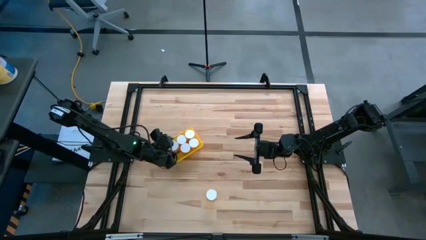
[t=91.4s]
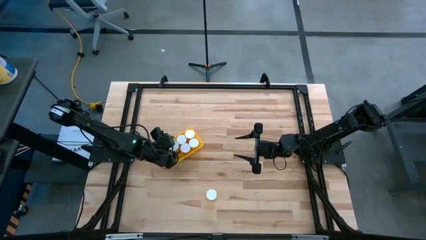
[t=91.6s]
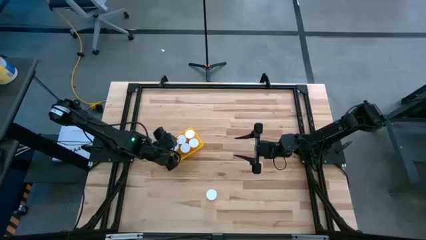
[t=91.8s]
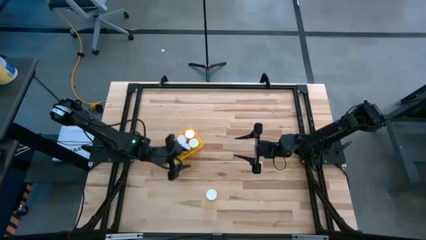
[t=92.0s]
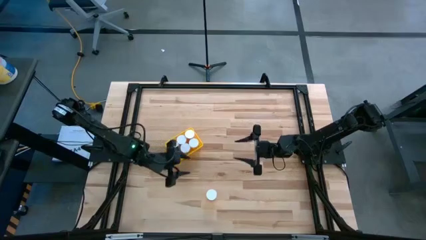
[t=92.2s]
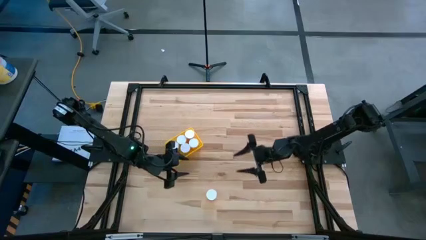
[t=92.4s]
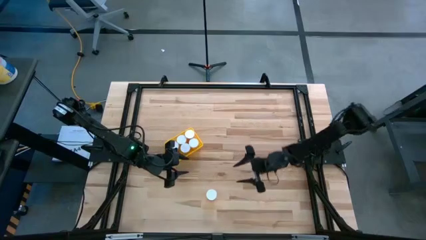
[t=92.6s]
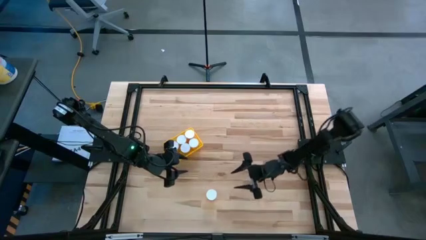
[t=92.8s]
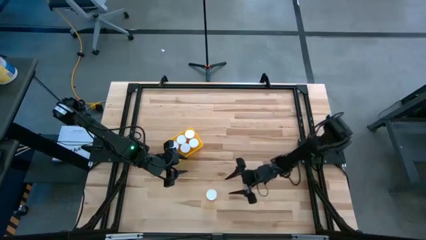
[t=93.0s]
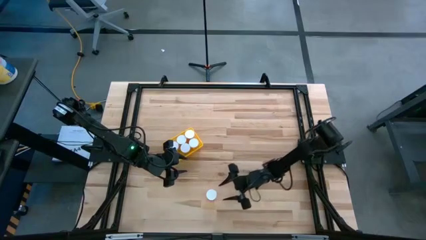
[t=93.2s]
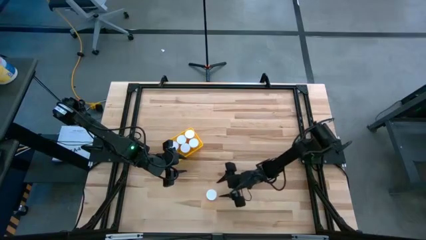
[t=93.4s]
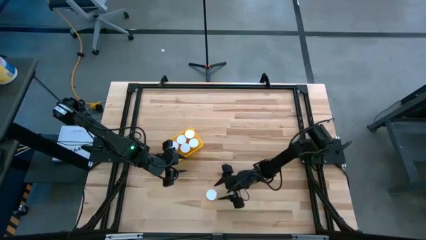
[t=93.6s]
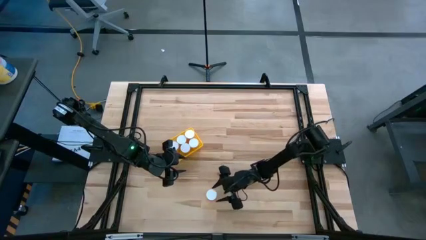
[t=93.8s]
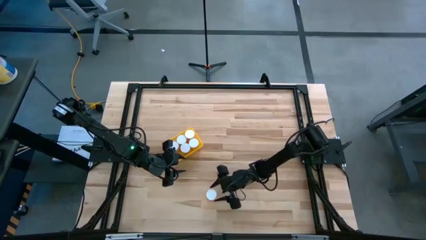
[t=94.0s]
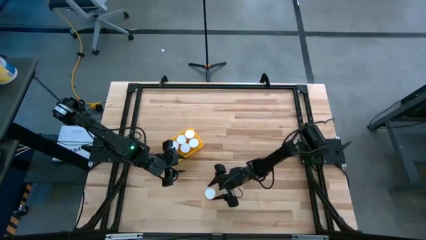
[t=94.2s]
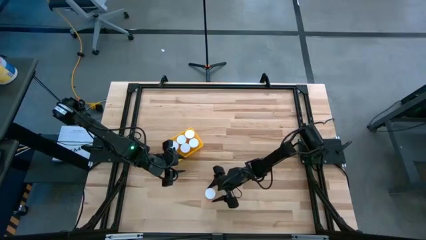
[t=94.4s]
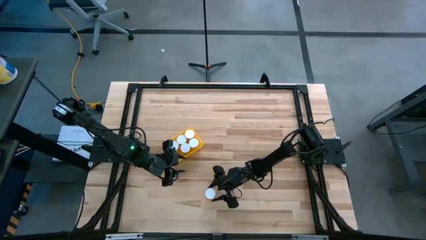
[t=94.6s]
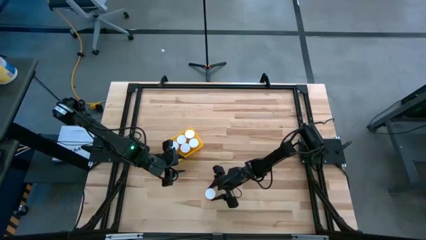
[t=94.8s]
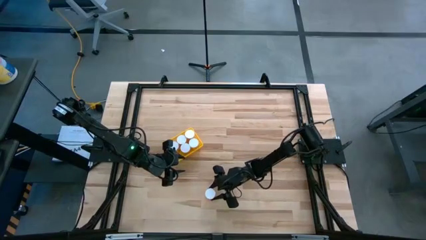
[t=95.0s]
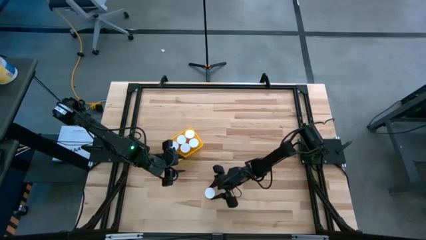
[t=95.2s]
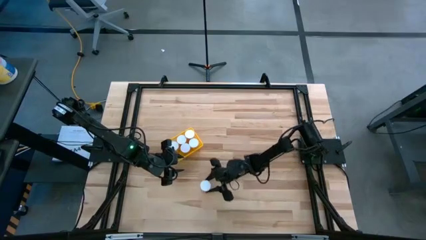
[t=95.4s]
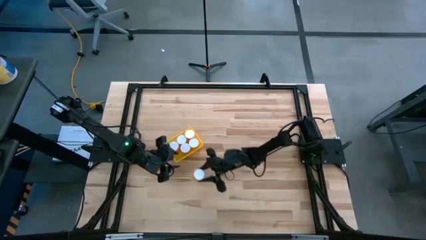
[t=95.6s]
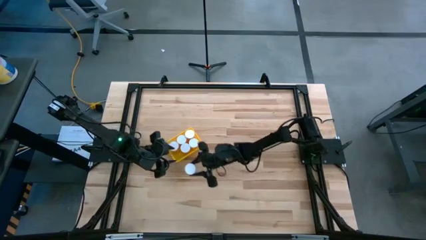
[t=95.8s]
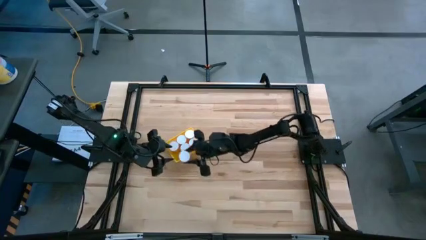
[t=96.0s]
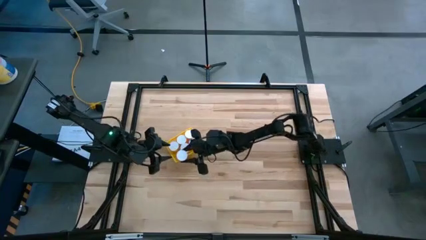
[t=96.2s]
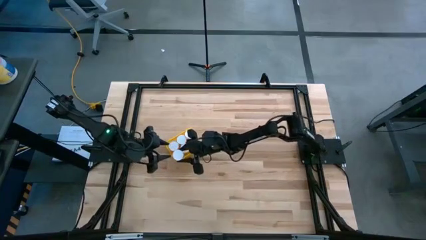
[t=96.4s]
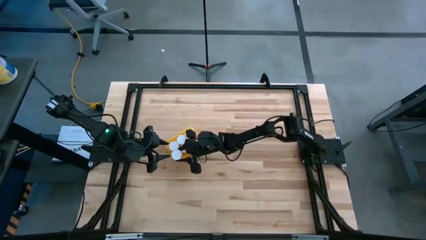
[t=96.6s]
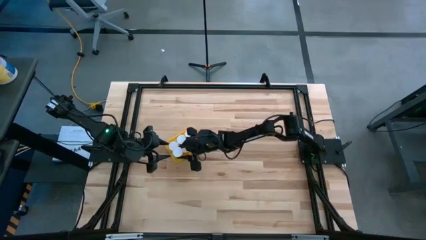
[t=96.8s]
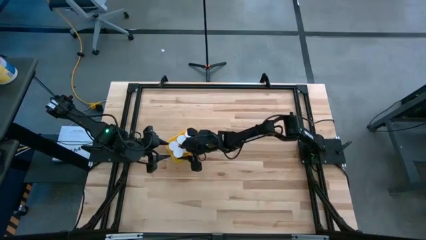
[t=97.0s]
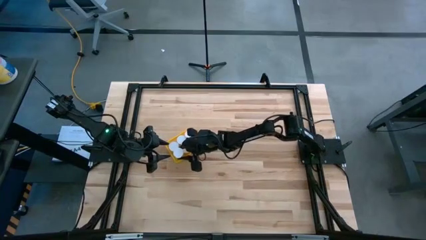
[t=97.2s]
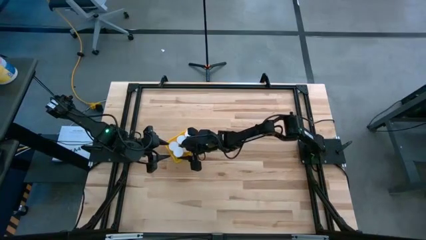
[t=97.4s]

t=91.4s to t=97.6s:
Task: Pick and place pill bottles into a basket
Put the orange pill bottle into the yellow basket

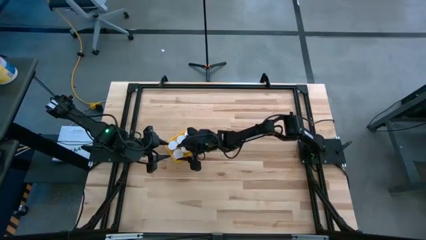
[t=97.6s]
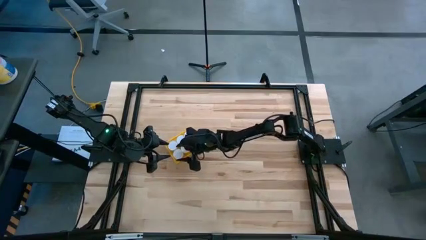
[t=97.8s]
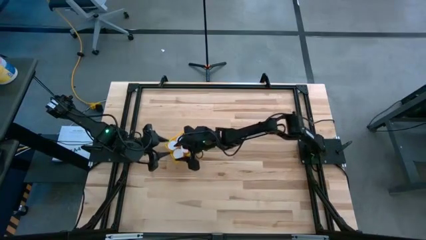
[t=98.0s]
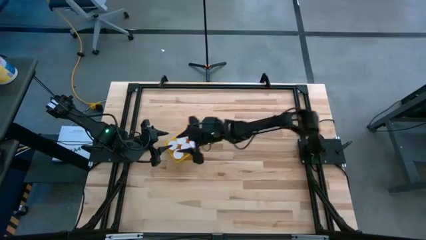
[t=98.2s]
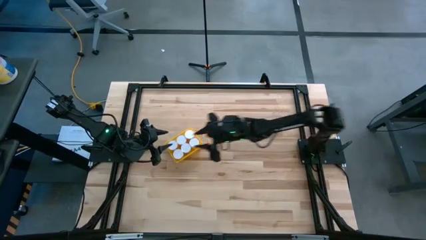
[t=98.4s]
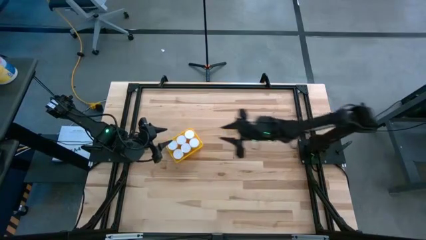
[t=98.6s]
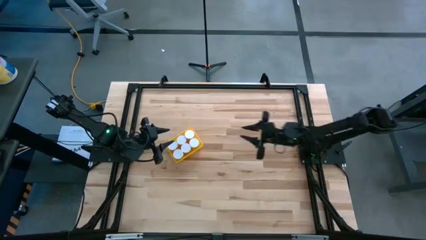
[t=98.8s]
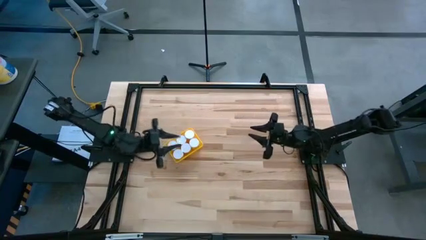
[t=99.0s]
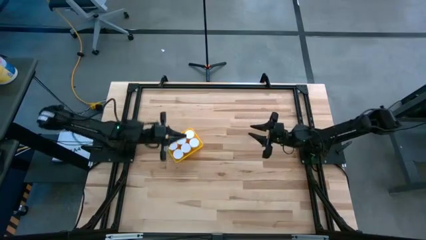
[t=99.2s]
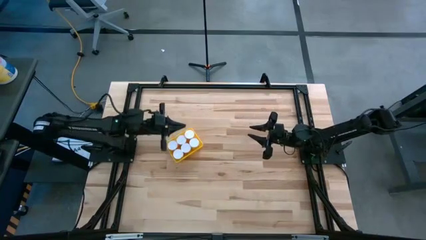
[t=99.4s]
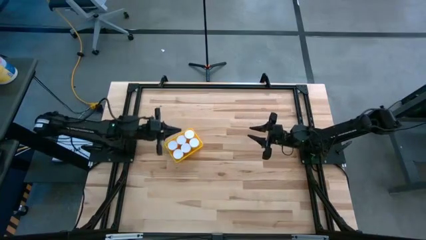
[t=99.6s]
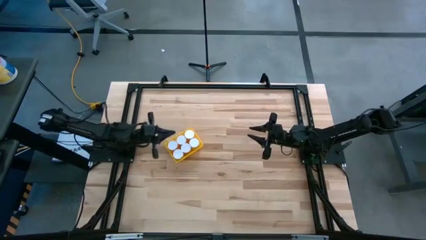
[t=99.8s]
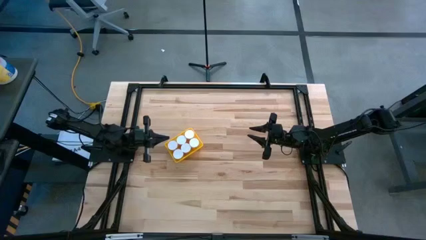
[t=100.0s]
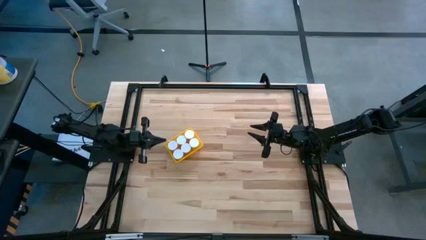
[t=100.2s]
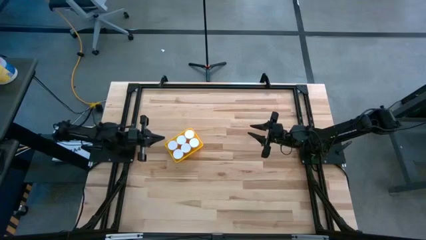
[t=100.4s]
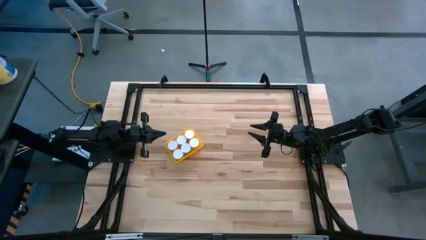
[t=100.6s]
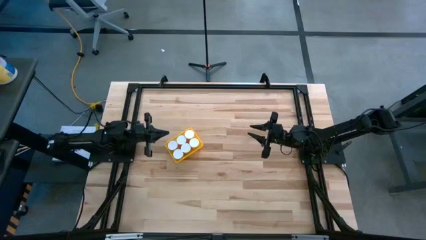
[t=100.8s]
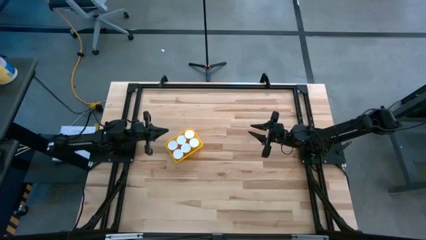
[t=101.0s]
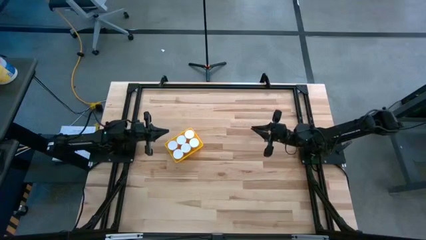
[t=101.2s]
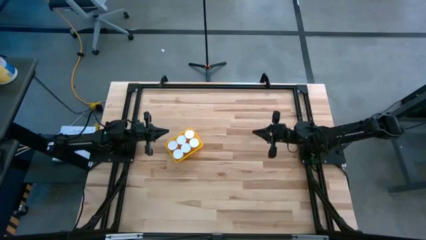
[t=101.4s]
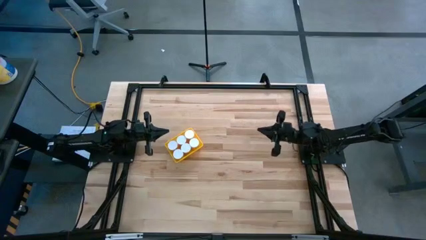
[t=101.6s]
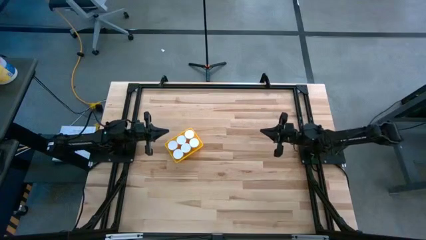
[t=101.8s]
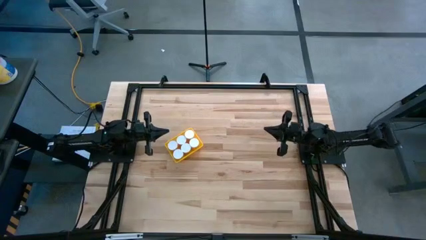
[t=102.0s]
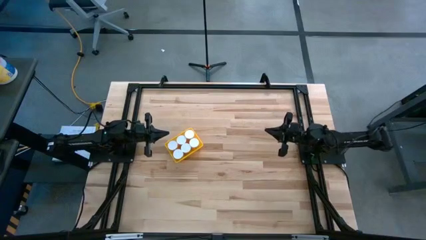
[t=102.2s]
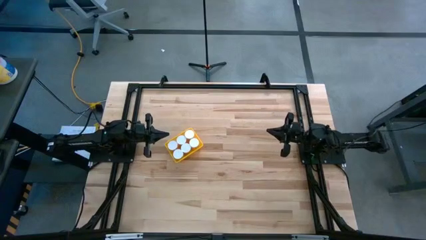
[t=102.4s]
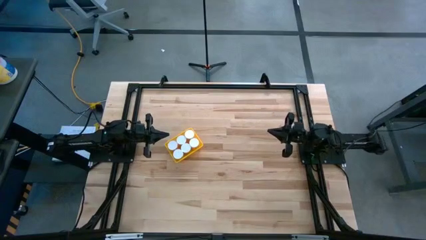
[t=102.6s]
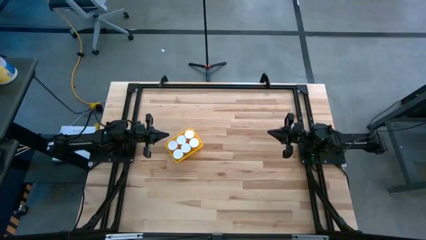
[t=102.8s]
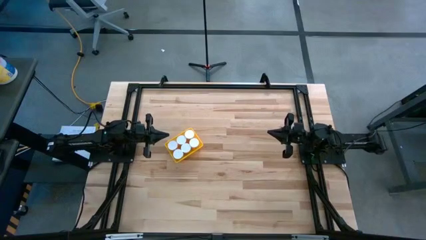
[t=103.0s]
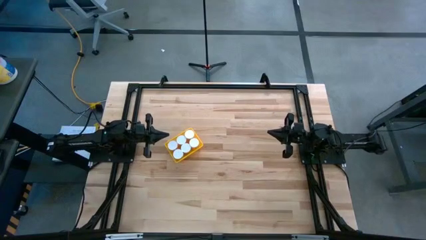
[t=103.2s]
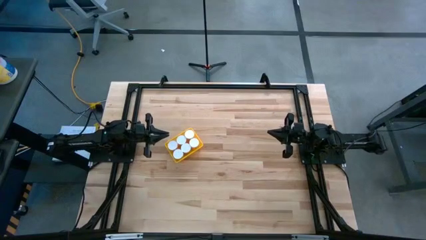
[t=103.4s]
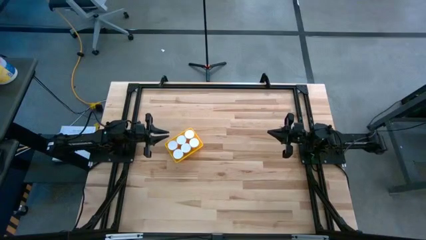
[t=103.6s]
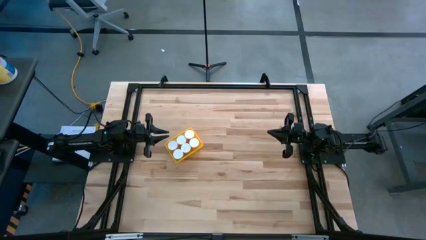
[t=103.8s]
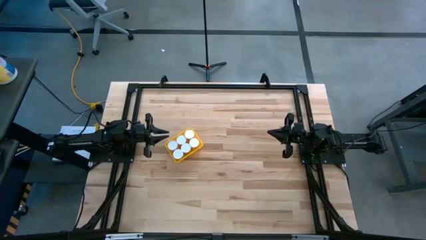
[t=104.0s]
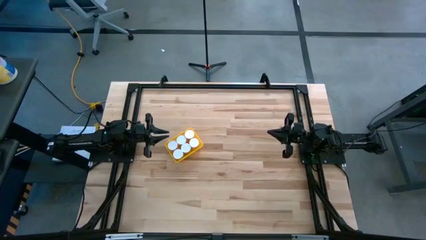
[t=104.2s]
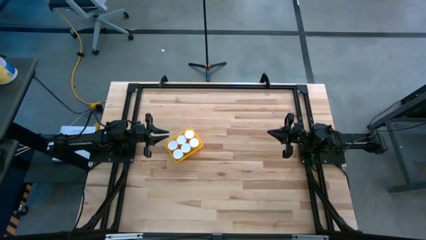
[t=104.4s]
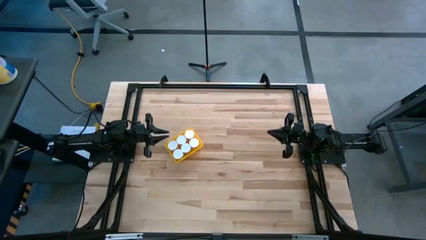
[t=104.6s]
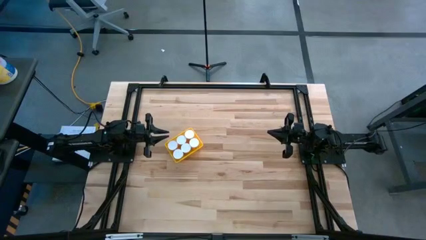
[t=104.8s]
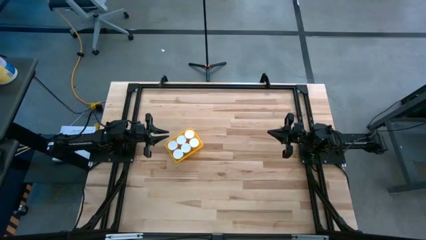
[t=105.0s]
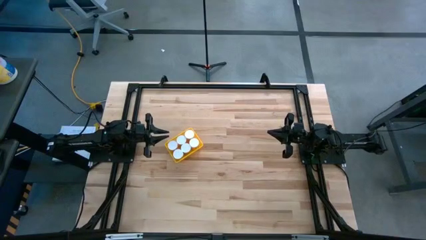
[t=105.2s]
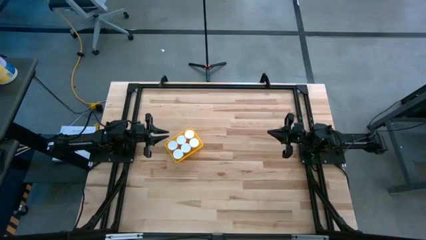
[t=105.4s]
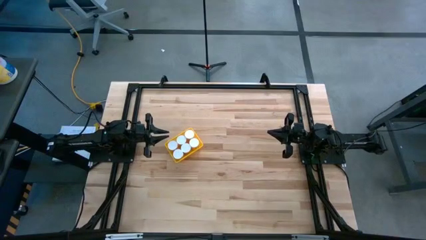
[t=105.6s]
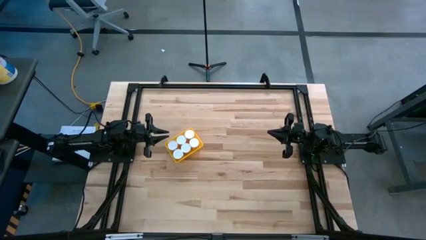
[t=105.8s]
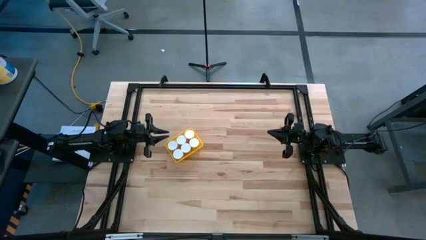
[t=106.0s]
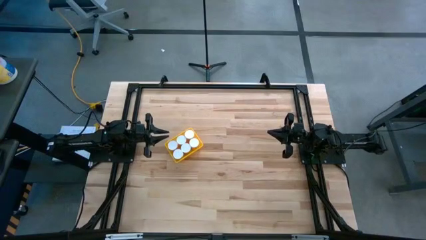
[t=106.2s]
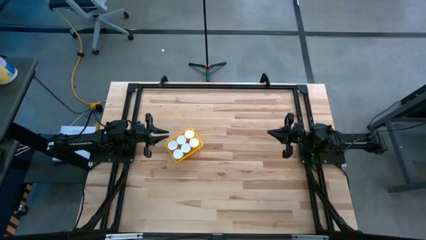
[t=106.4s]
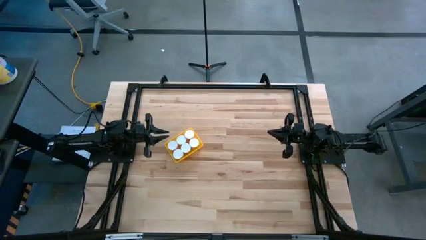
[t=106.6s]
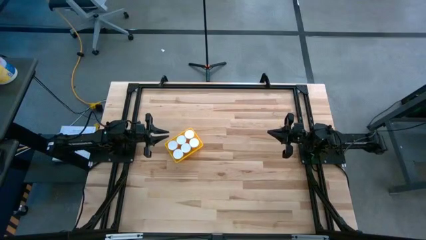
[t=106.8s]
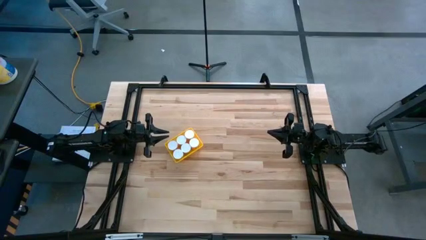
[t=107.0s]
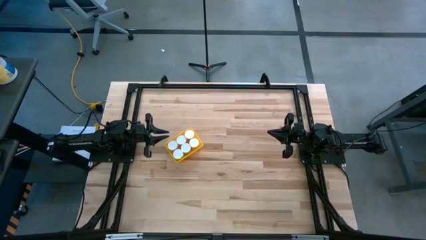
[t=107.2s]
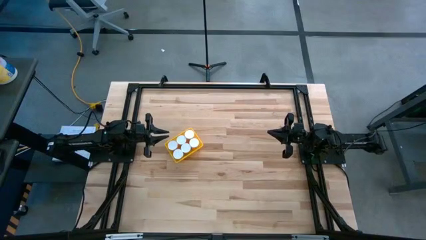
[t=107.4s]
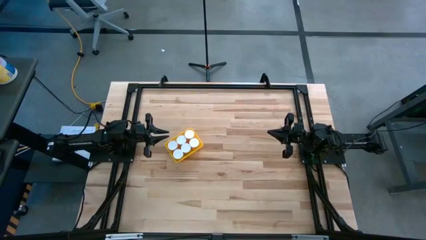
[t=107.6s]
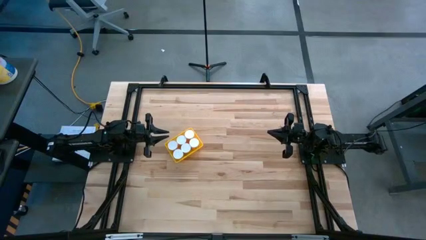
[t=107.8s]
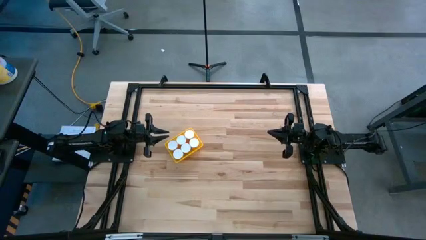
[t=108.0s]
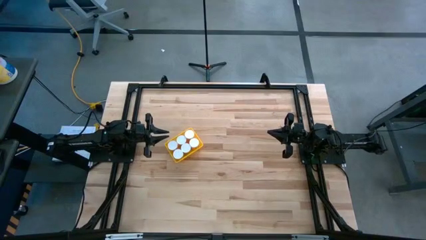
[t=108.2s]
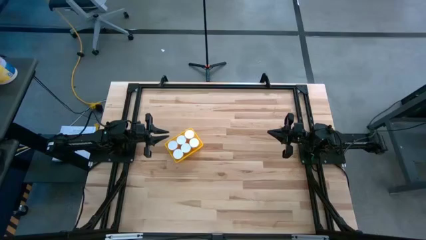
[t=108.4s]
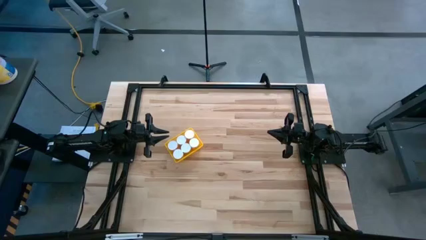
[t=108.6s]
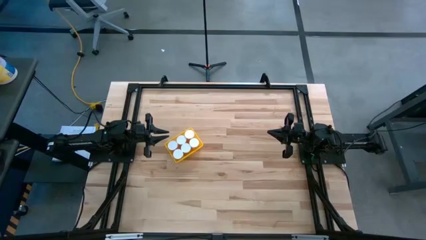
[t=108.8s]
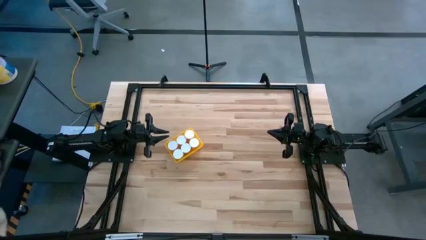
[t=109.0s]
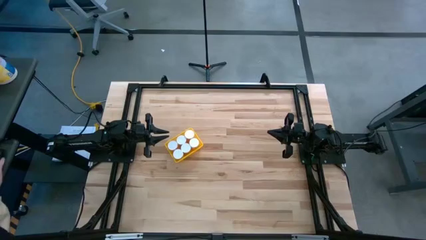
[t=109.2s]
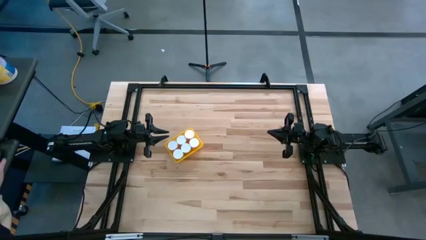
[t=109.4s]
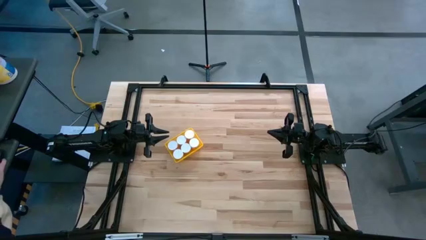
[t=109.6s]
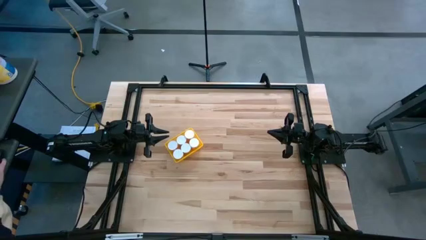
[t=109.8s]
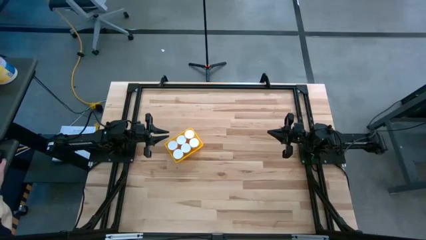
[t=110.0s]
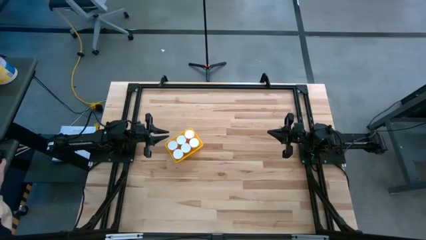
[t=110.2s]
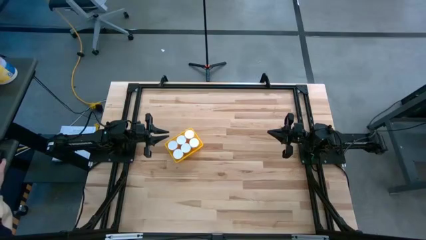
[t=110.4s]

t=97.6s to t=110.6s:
Return to Home Position
